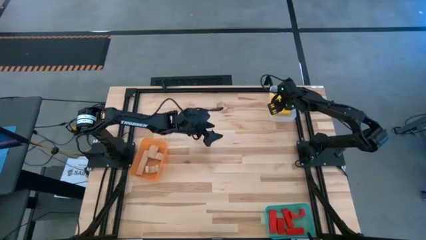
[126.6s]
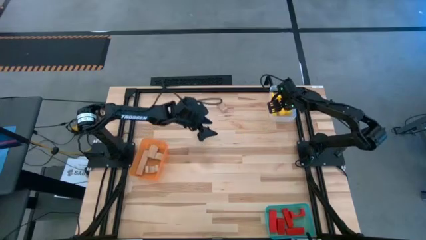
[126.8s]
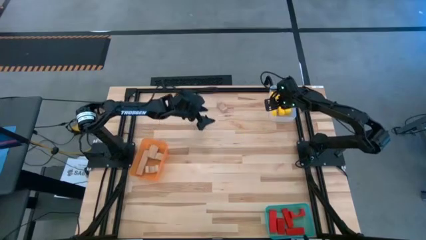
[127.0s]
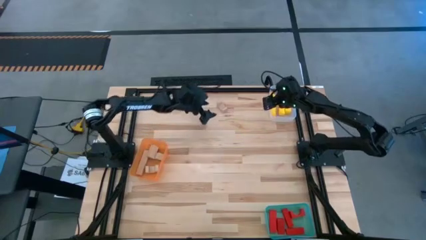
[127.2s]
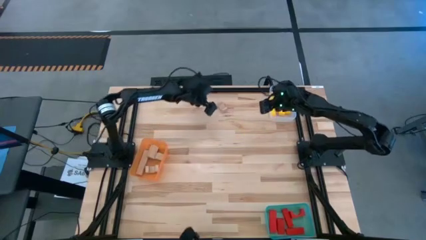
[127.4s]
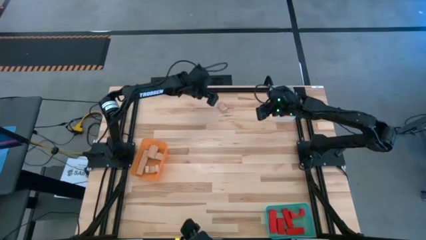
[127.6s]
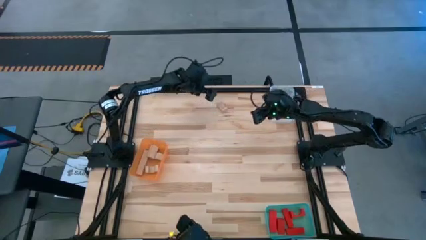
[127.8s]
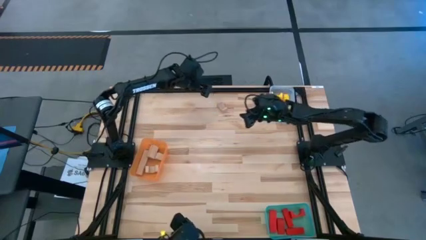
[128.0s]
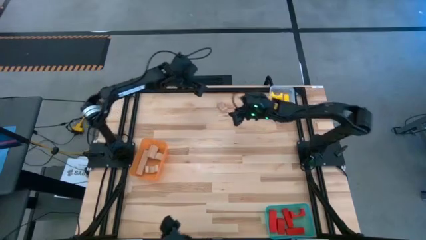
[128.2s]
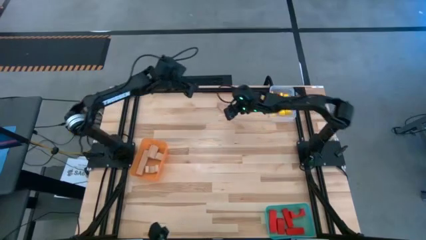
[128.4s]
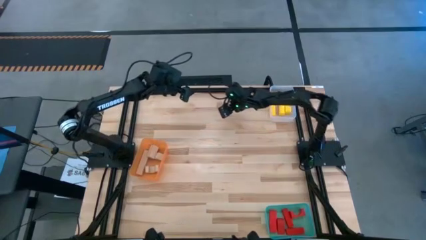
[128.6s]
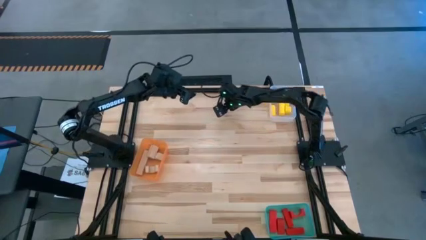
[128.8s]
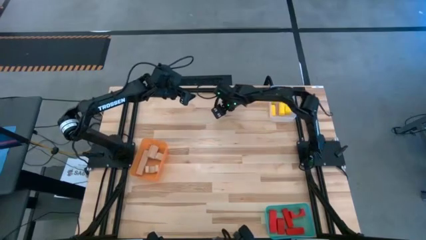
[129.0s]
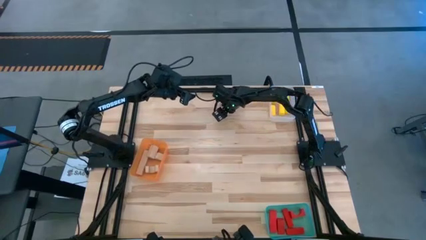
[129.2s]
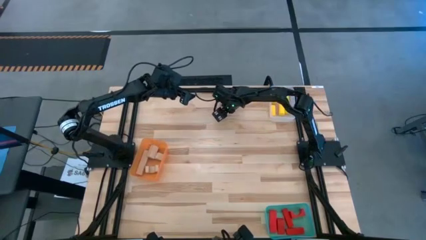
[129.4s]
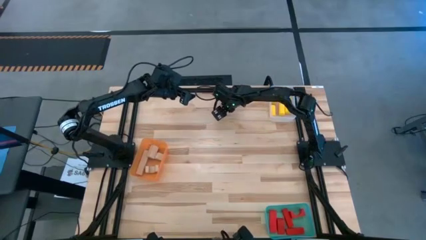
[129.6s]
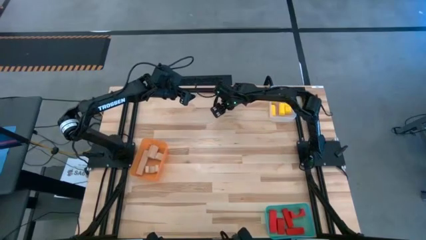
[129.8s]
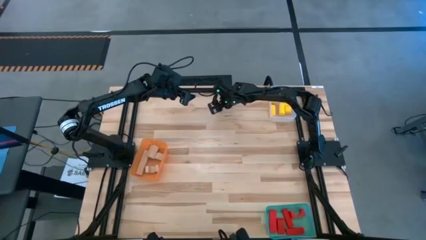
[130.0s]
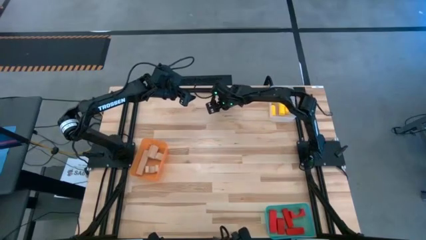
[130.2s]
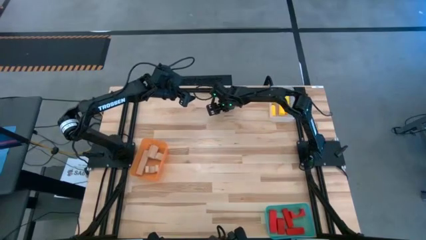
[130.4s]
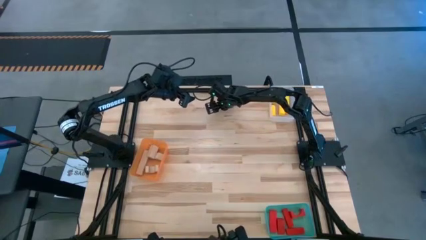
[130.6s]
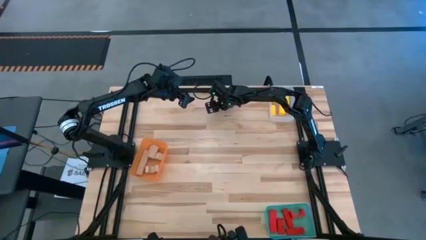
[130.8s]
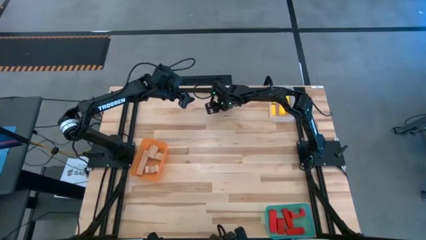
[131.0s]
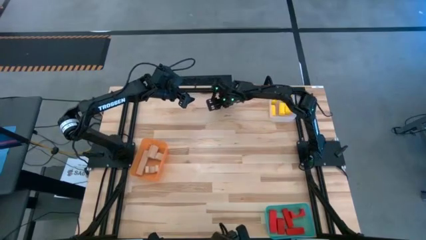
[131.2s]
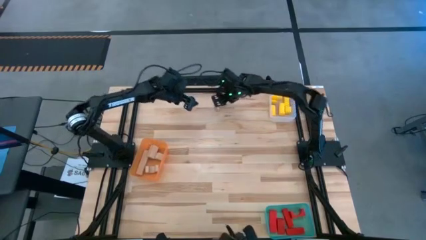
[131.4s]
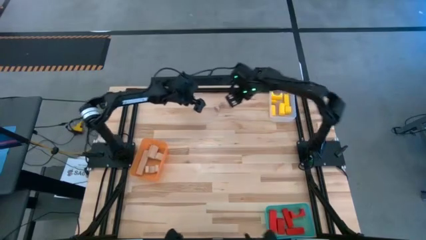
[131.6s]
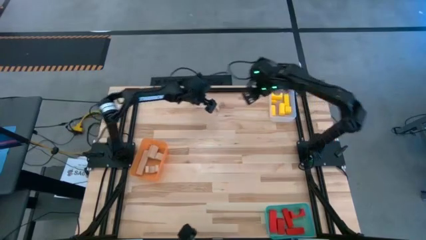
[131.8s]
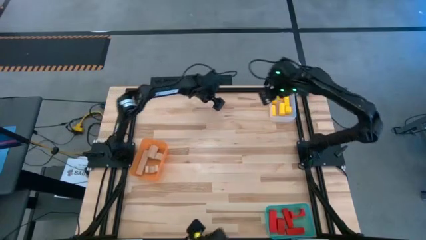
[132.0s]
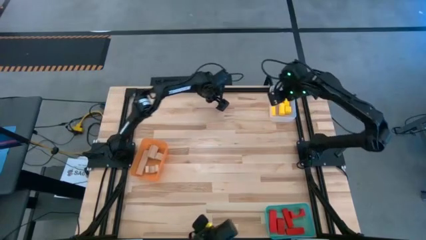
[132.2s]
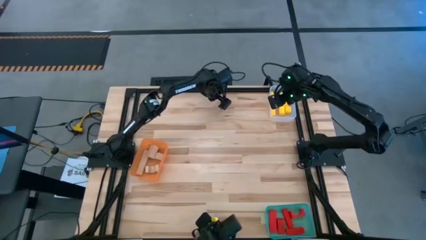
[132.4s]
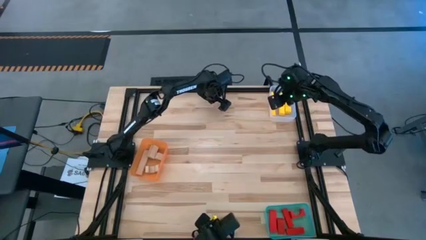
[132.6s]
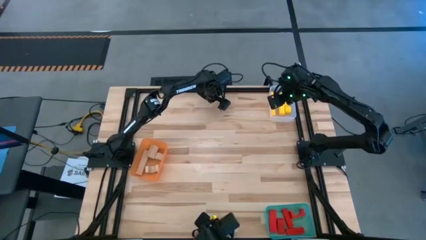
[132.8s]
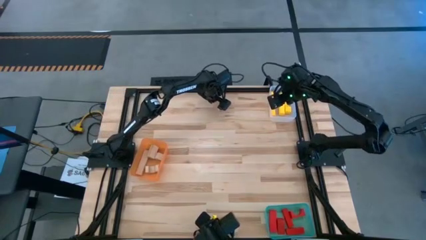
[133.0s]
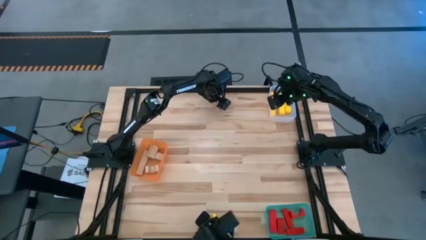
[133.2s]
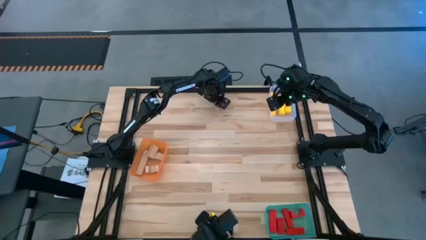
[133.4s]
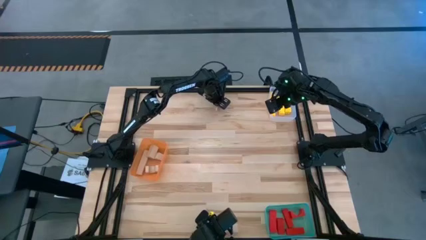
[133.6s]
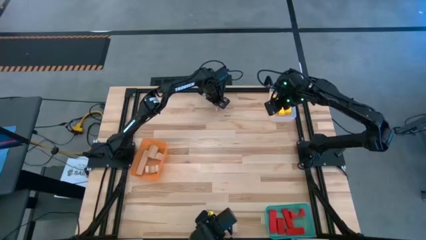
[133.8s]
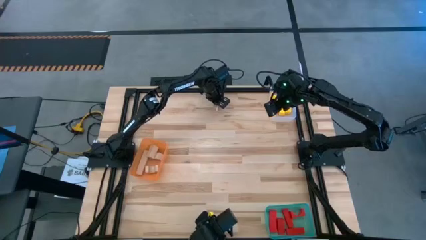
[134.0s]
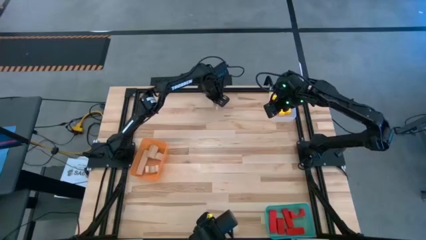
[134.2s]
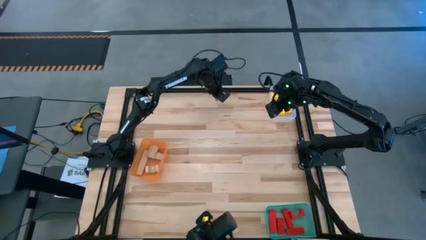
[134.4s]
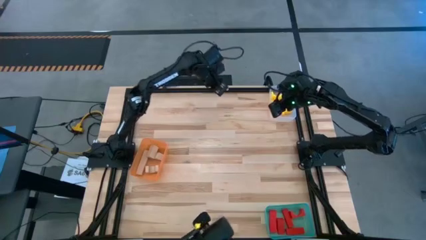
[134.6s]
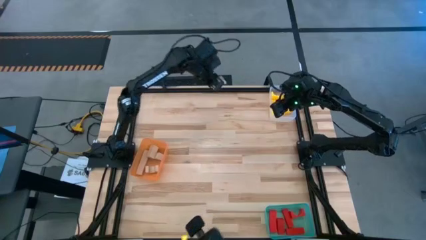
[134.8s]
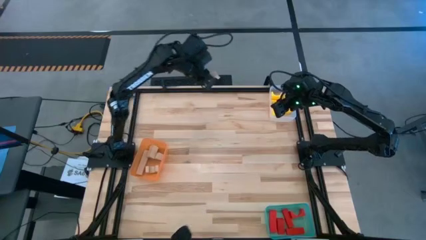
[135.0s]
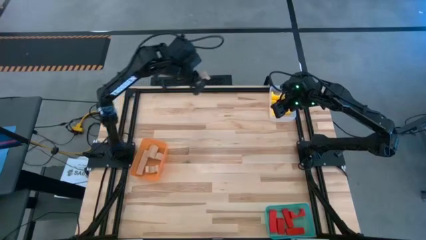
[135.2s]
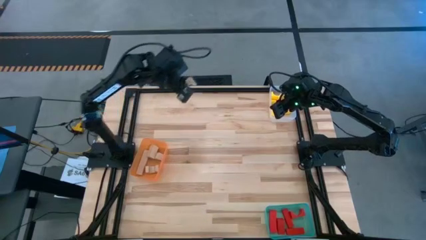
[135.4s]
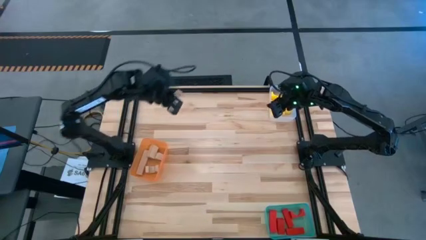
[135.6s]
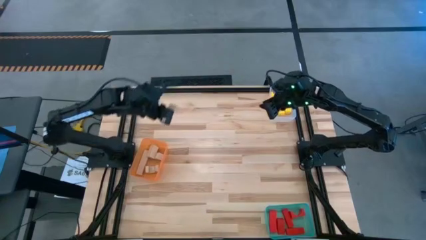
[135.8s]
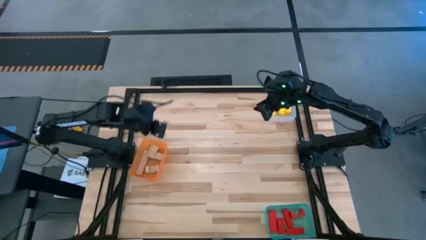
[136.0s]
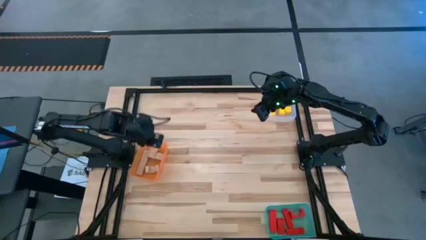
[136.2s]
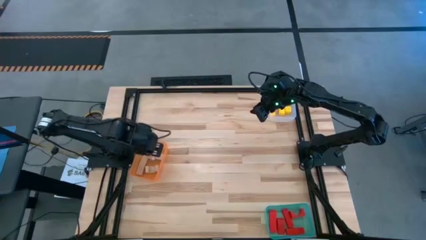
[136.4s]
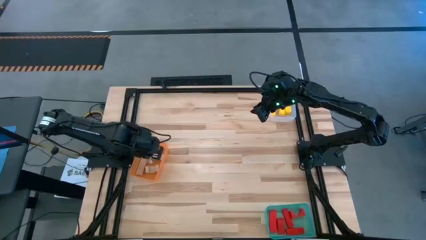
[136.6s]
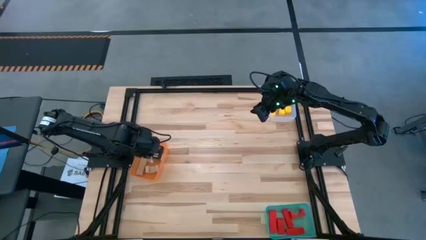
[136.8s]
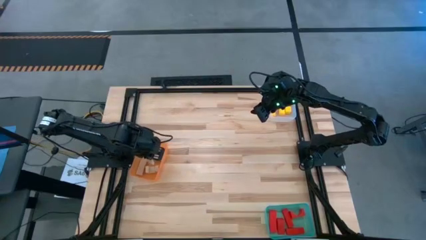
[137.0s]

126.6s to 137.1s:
Task: Sort & place blocks by color
Put the brown block into the orange bin

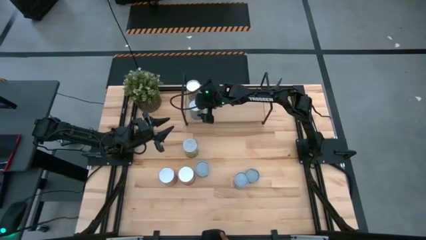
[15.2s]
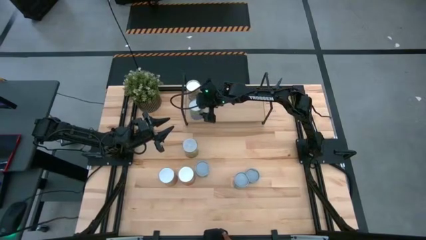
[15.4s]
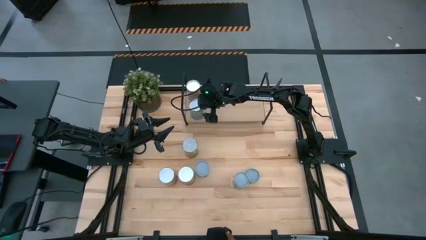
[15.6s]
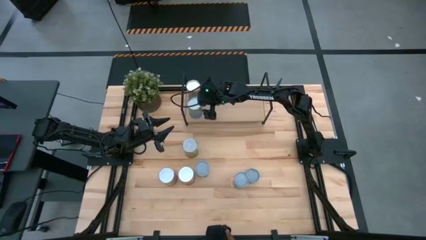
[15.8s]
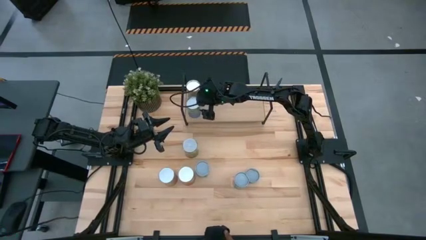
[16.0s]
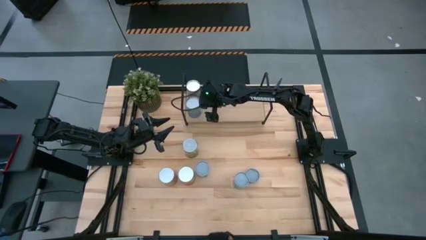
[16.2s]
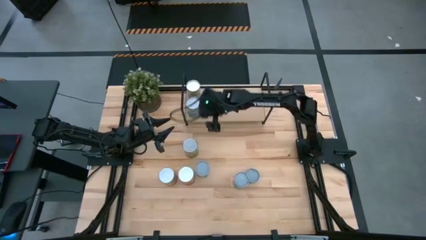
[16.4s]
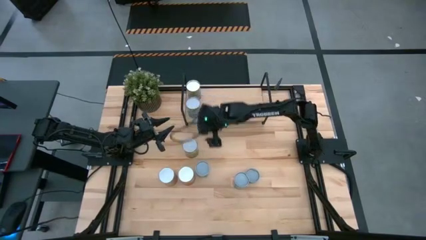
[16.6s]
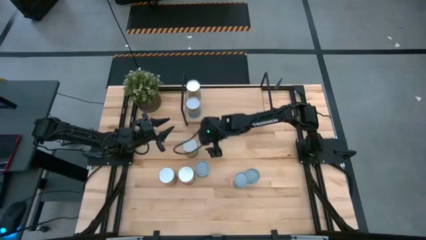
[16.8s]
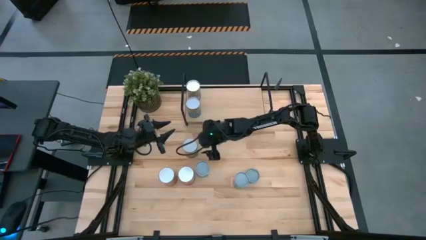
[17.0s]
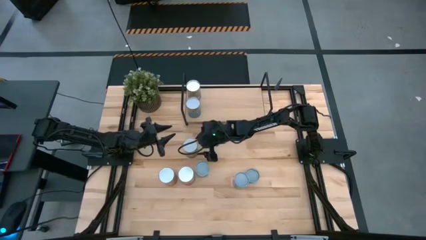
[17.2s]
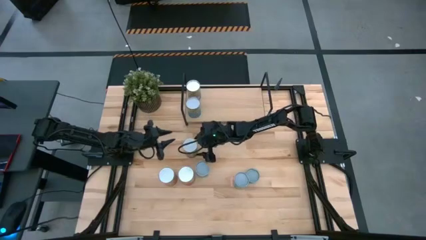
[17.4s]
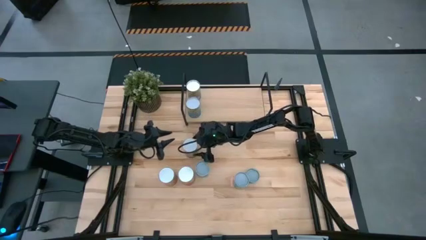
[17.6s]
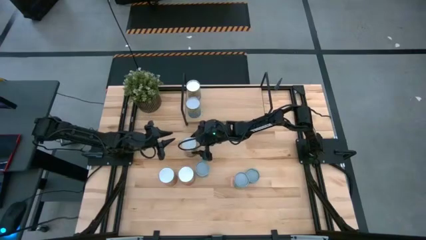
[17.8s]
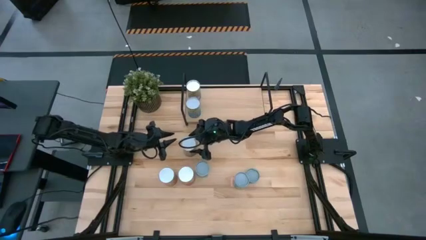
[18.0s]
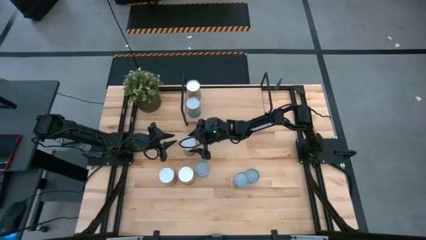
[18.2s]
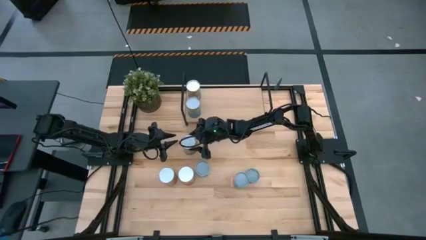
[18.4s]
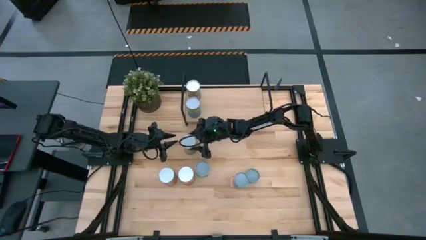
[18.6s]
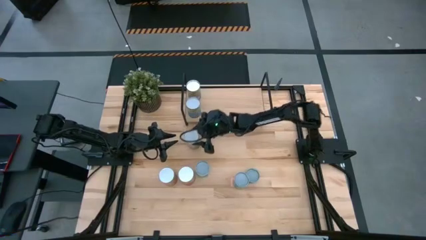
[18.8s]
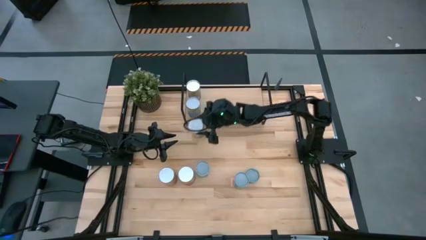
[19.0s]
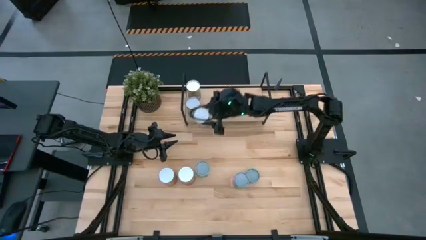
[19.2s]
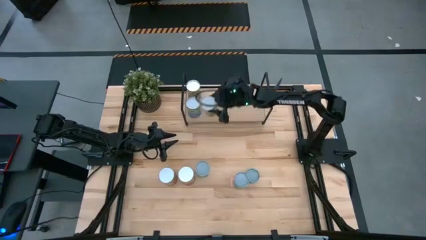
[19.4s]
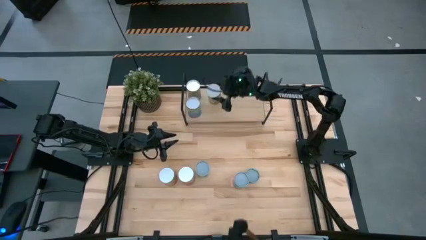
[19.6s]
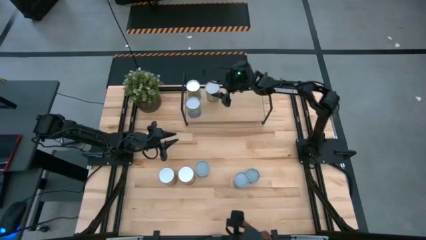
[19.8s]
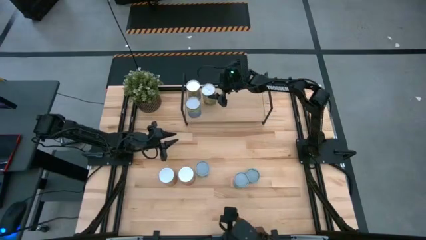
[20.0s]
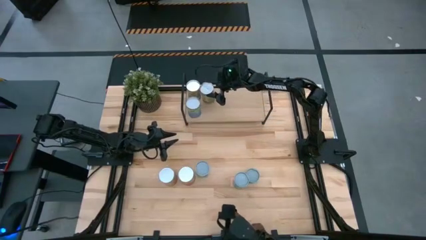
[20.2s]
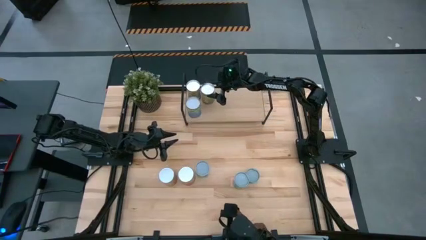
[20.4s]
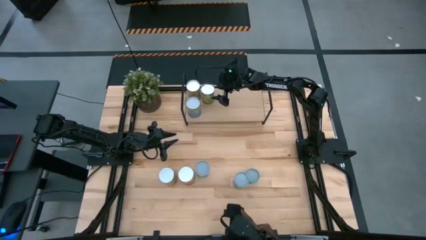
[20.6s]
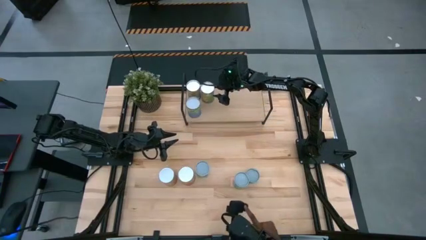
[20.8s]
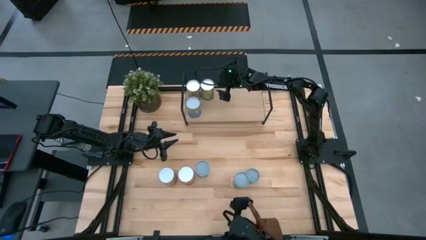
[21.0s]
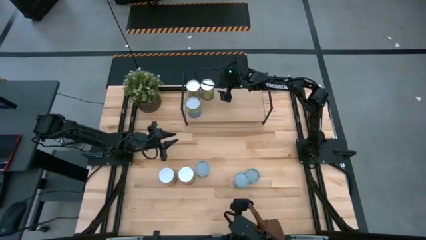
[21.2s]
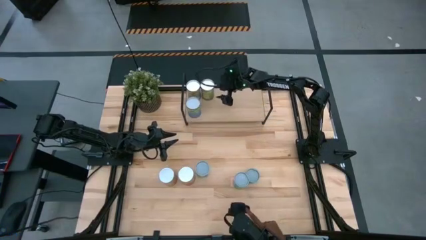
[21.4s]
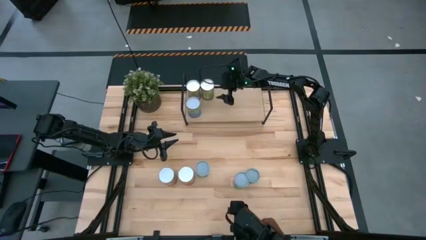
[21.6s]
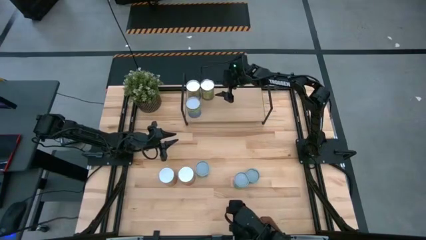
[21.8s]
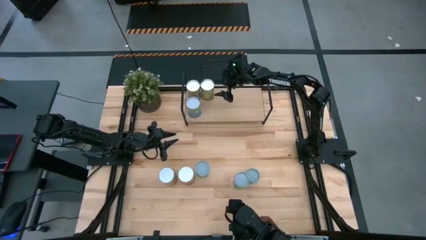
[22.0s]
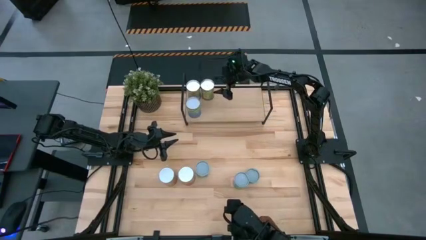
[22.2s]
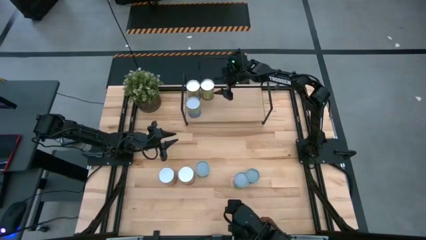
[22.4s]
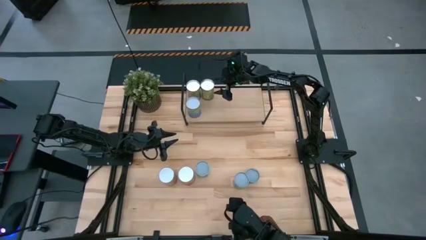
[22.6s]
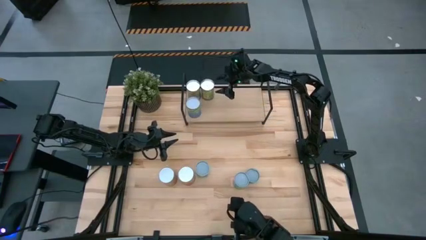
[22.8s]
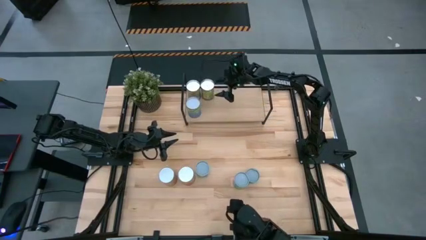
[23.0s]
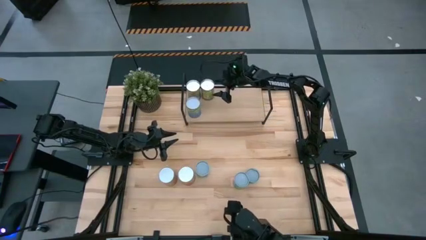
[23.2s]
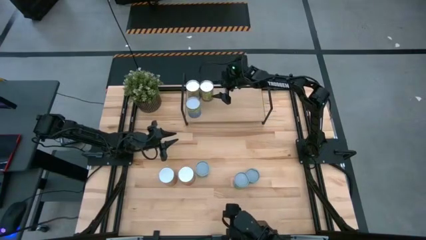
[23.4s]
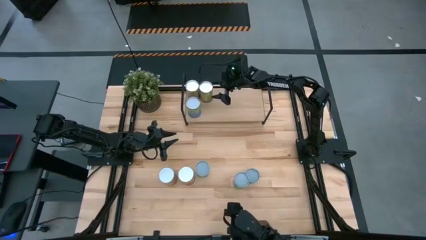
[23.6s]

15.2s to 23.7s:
Task: Pick and place cans onto a shelf
Put the top green can on the shelf
